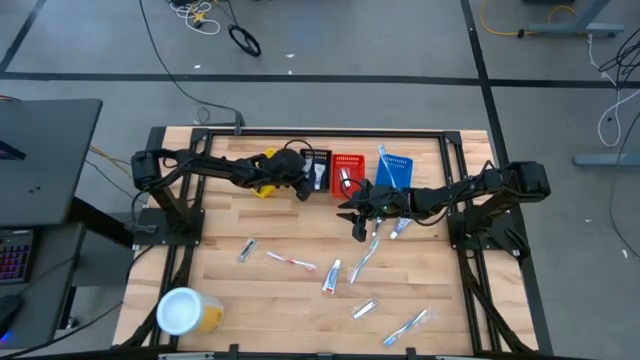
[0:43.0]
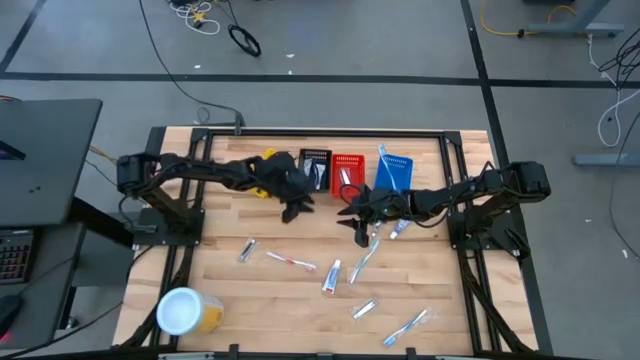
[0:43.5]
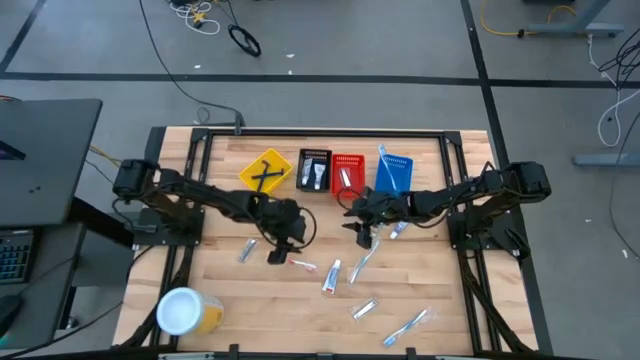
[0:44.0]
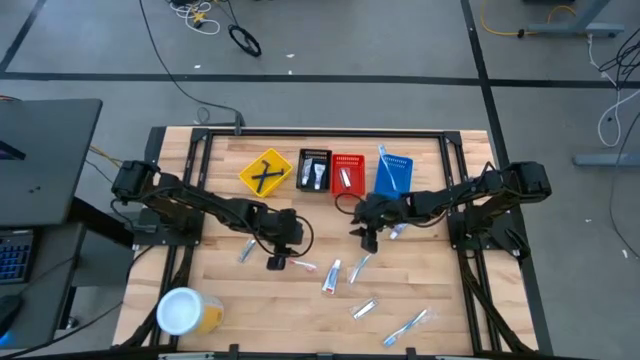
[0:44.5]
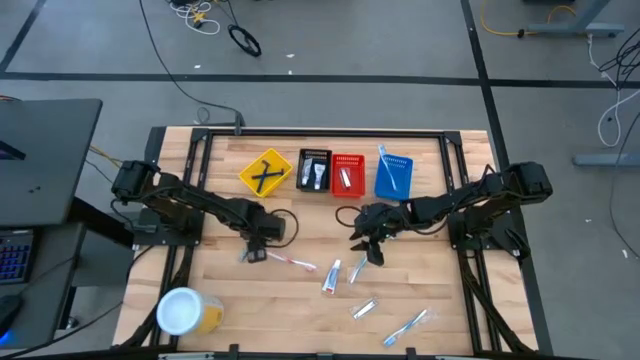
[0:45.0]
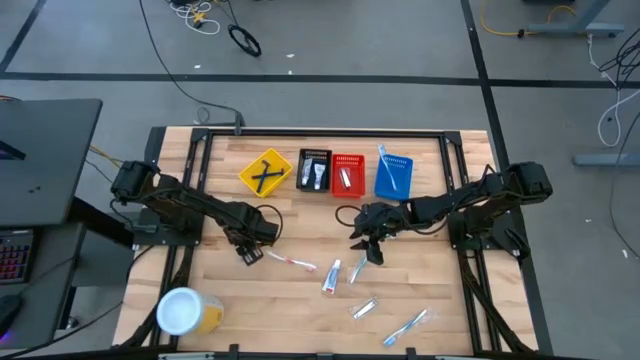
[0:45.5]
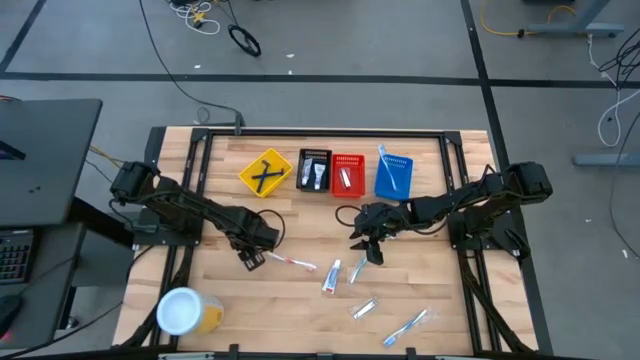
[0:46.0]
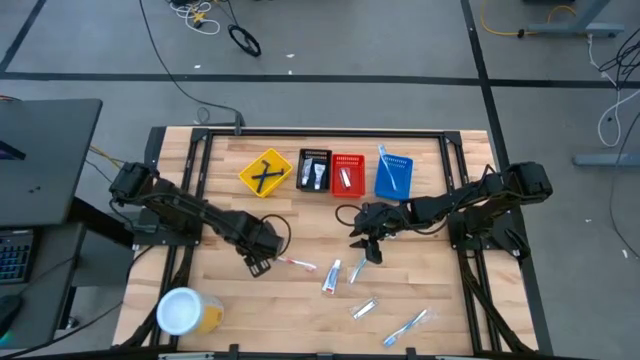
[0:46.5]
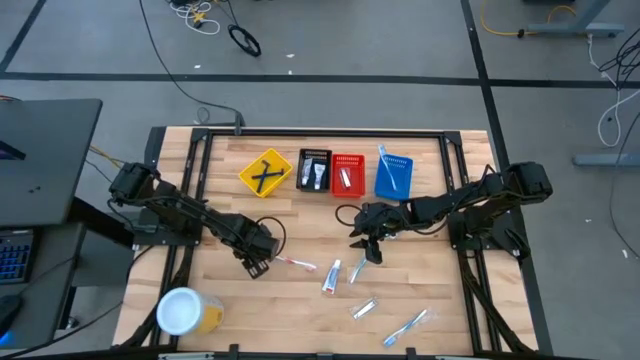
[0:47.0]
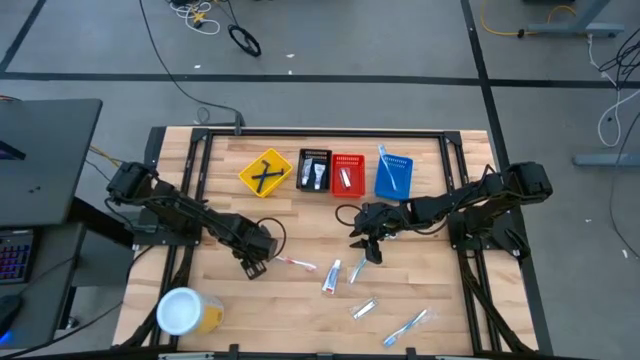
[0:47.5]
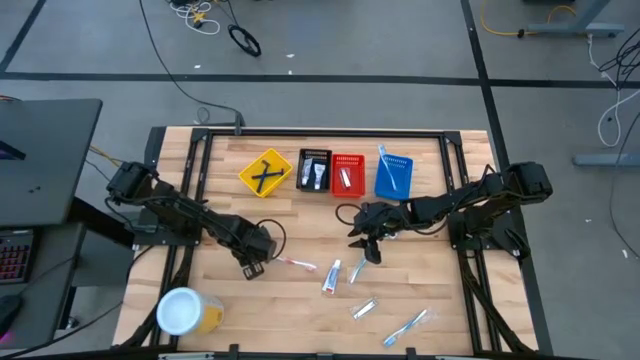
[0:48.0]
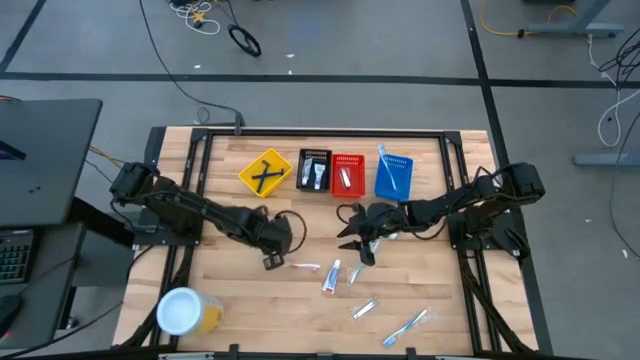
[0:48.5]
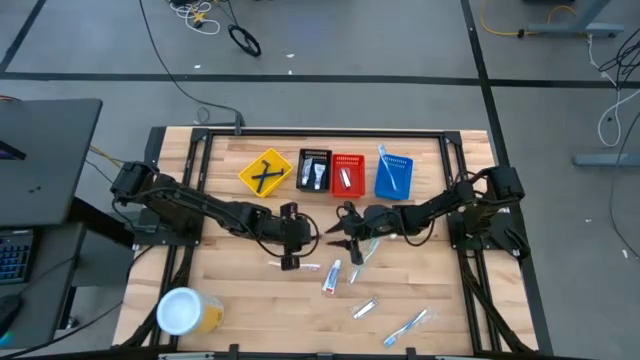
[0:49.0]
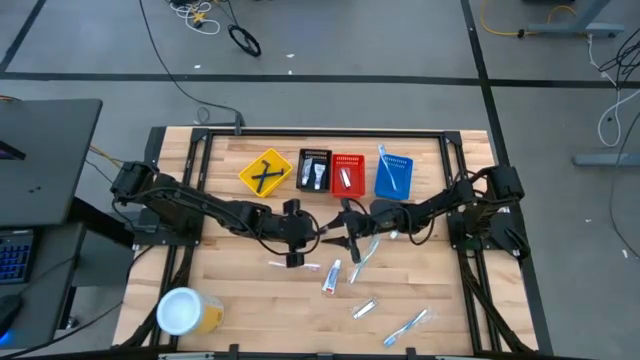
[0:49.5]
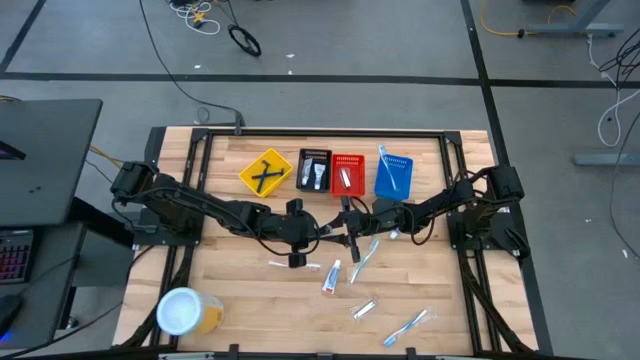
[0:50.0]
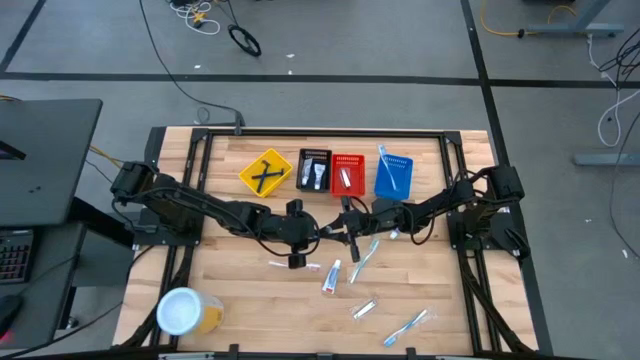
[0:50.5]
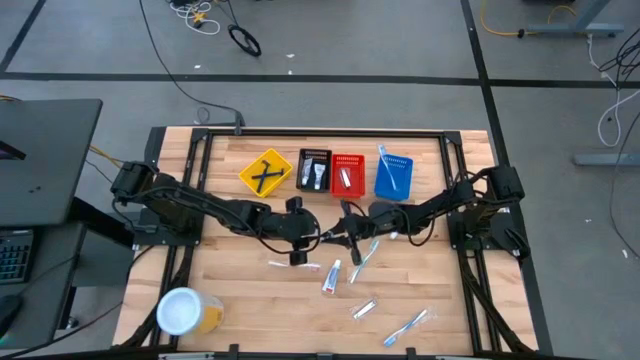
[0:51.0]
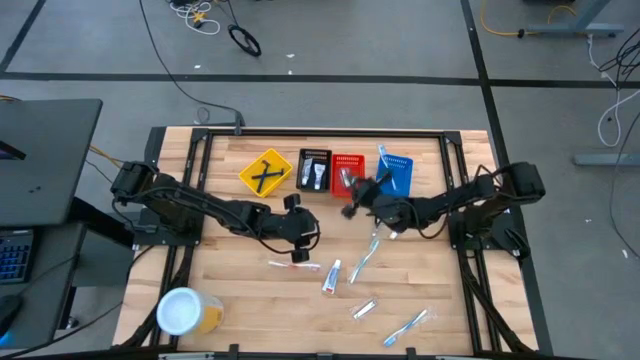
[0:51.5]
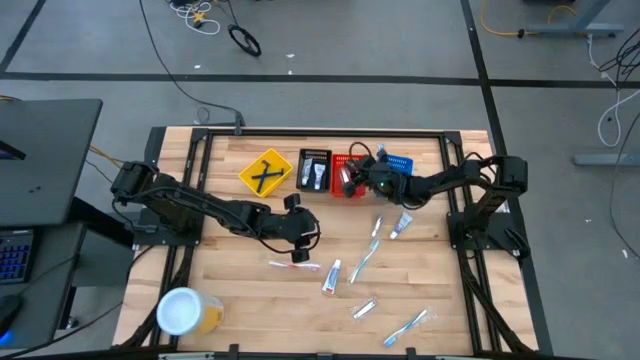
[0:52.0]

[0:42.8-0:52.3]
Task: Pick & Place Travel size toiletries
Put the silver nail cutter into the red basket

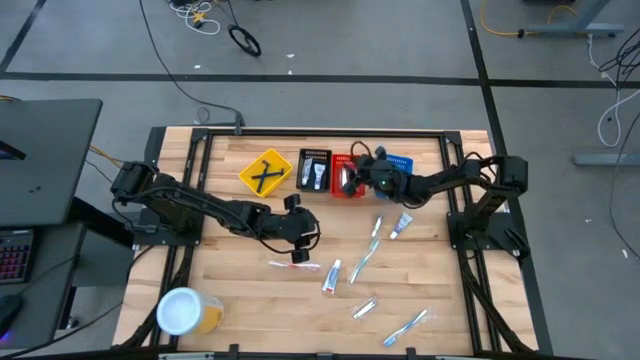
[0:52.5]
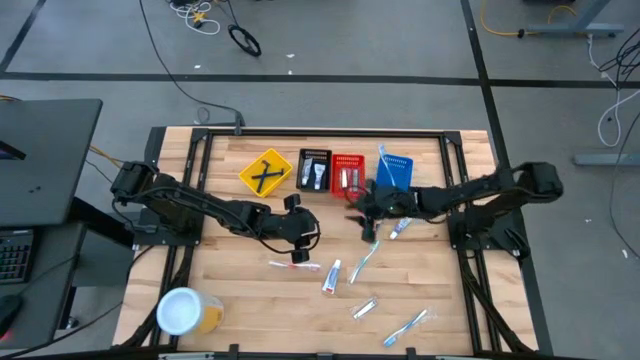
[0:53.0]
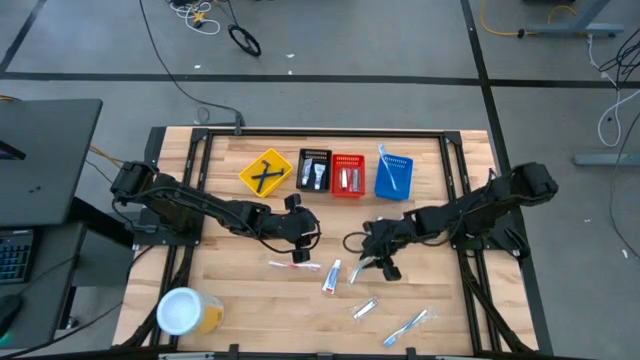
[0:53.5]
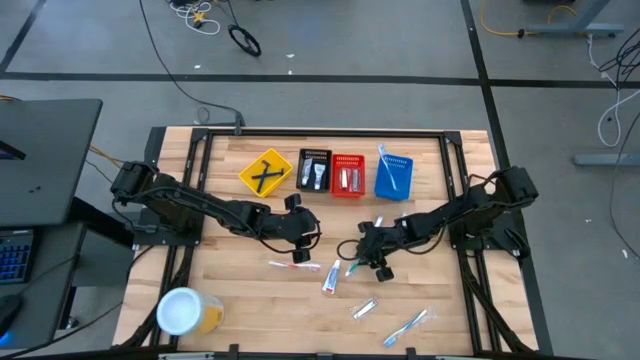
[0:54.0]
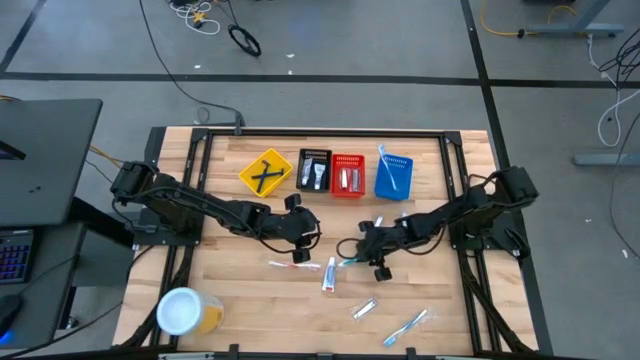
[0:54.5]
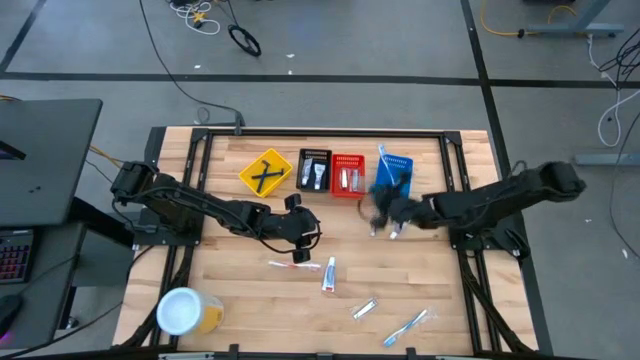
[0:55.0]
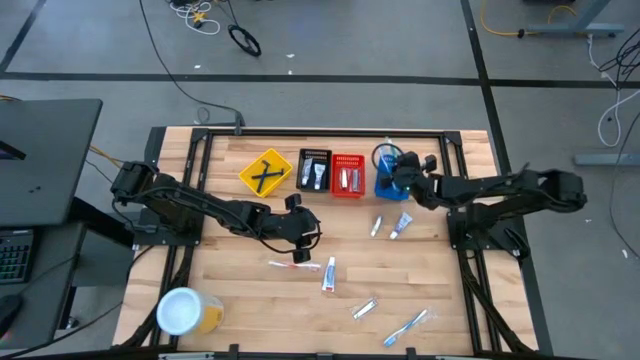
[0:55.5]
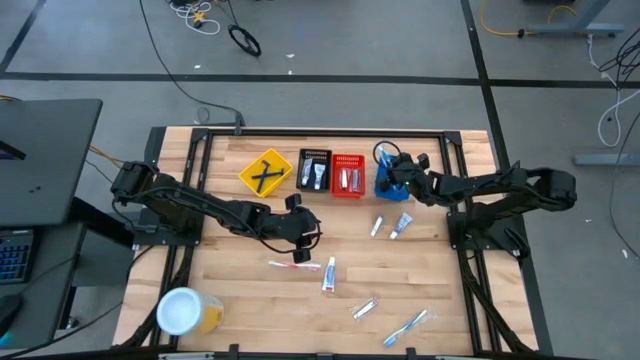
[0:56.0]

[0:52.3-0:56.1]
Put the green toothbrush into the blue basket

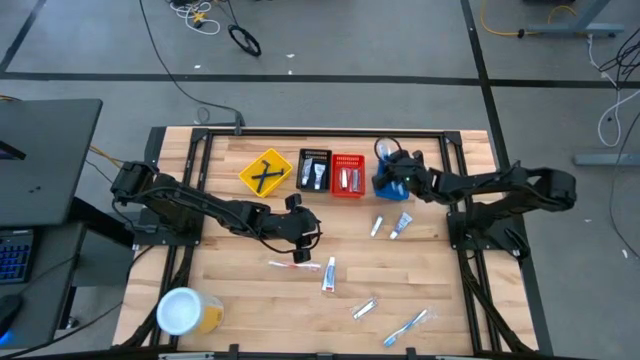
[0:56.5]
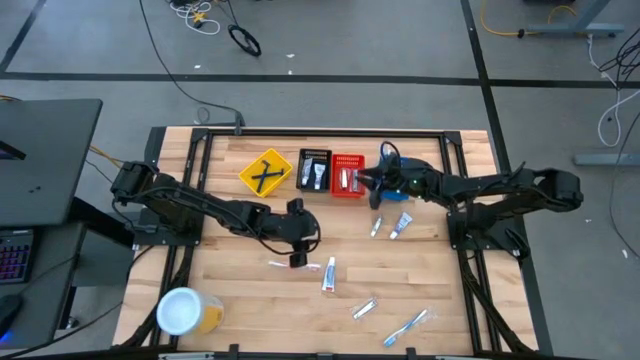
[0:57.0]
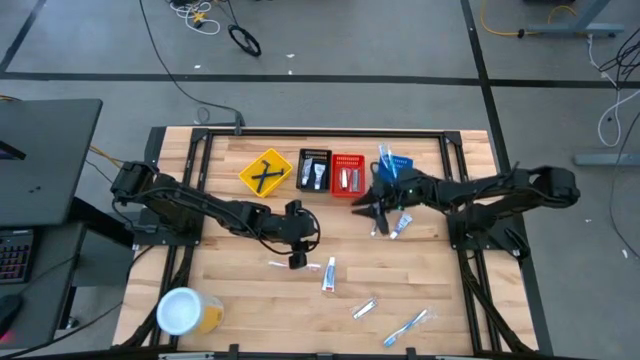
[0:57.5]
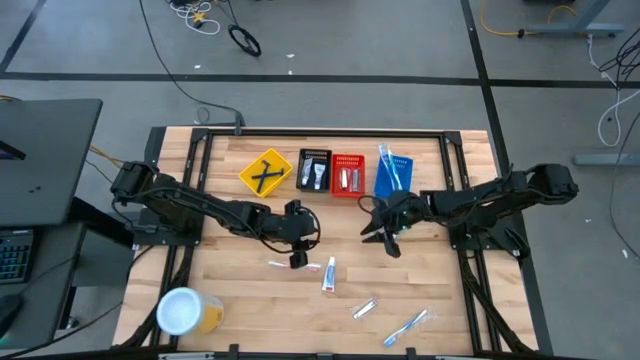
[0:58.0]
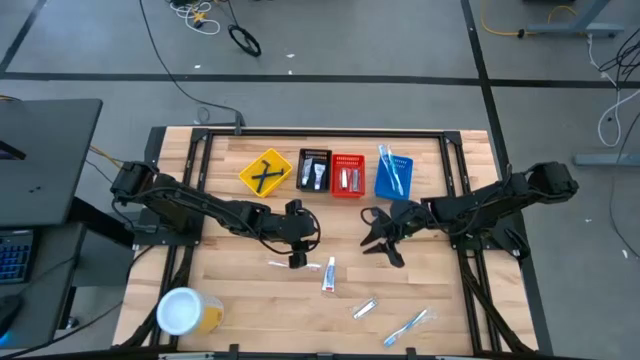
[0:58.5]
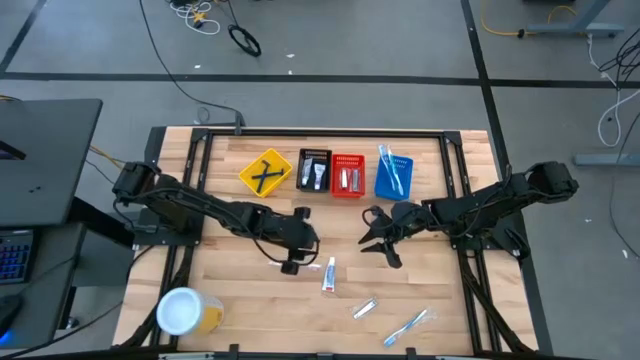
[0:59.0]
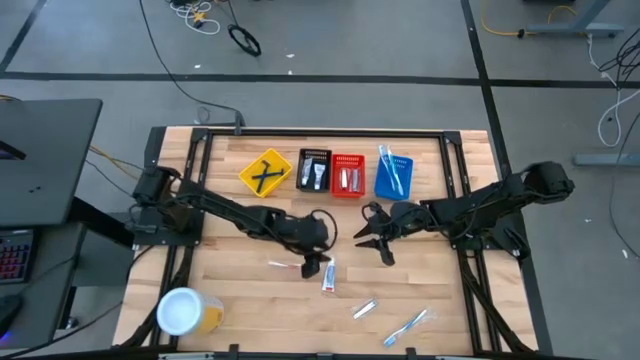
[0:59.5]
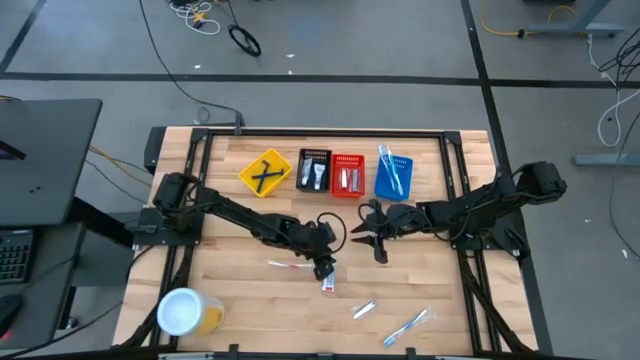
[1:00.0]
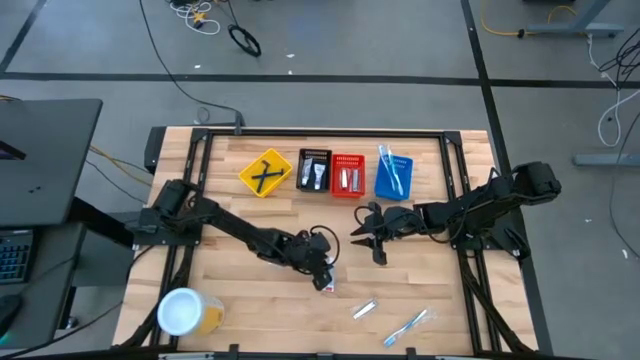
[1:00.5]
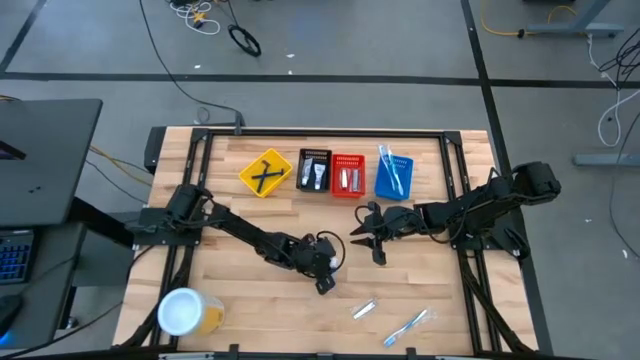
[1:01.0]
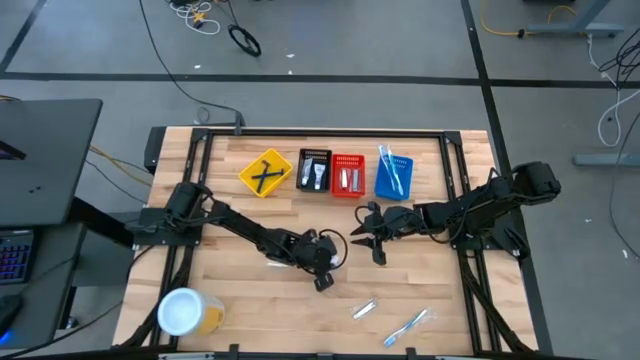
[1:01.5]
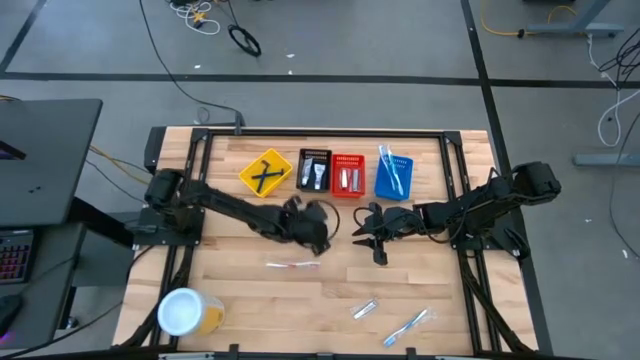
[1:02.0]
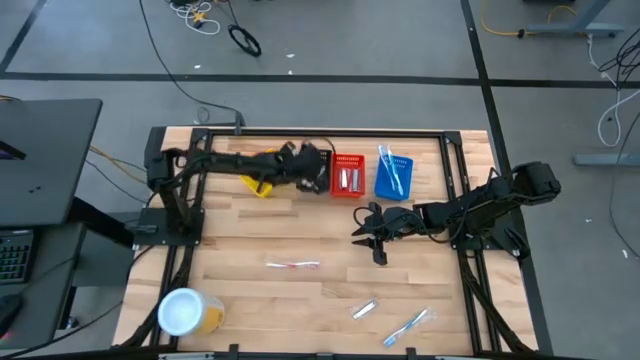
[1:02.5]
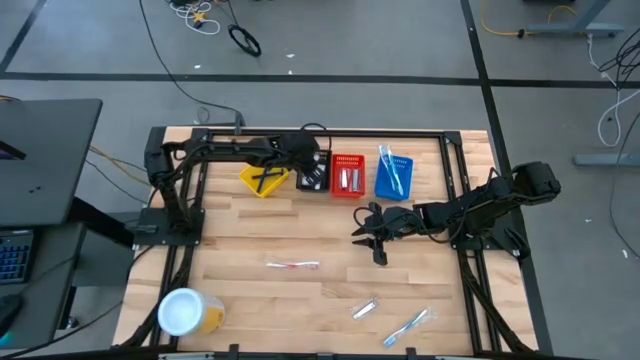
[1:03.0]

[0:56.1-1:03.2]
Put the white toothpaste into the black basket

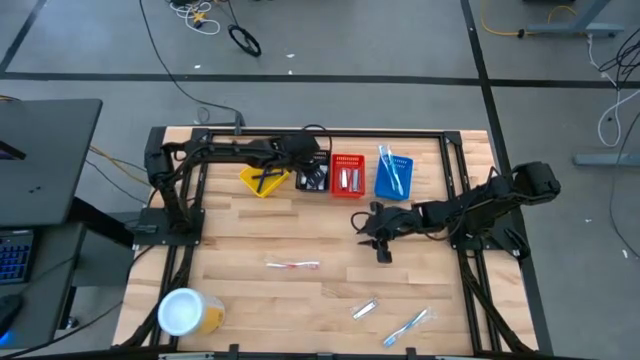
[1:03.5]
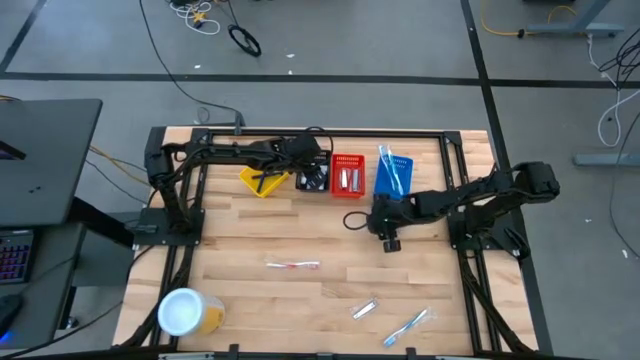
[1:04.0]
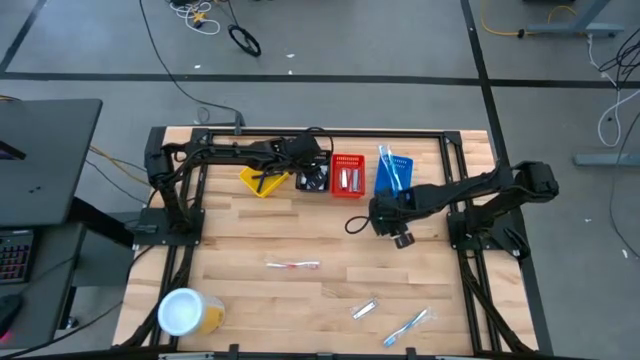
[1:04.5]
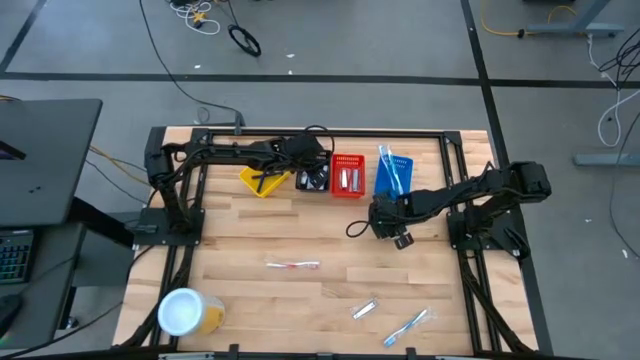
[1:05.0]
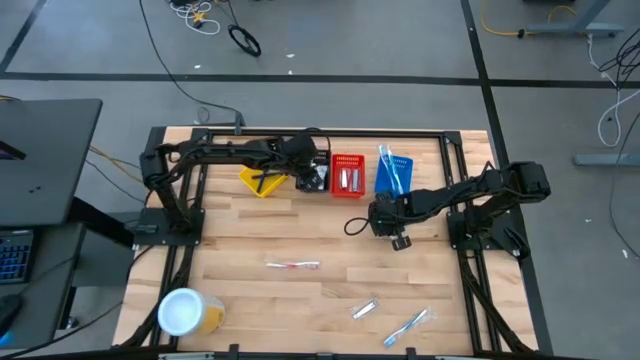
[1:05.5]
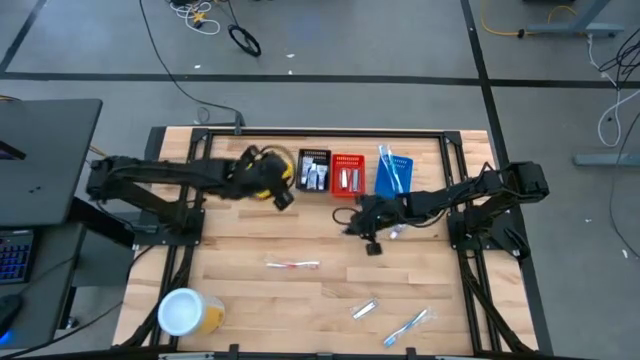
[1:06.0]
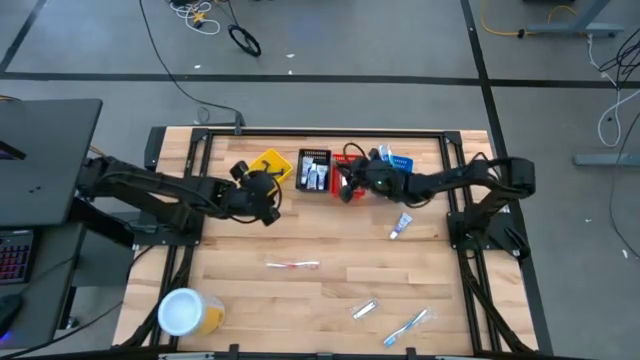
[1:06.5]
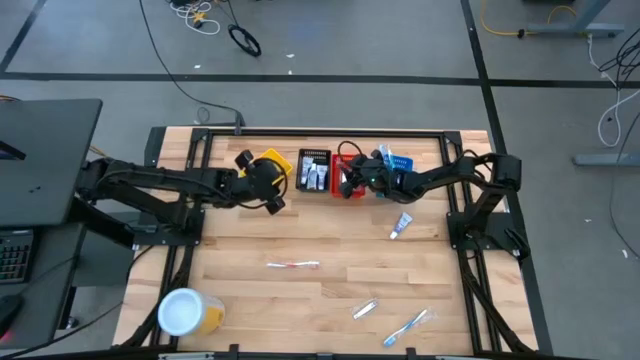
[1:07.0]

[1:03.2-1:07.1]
Put the silver nail cutter into the red basket
